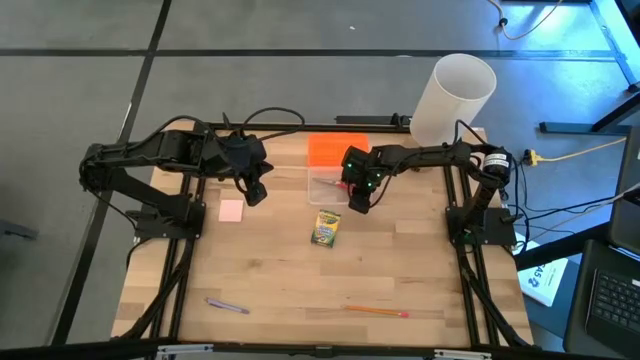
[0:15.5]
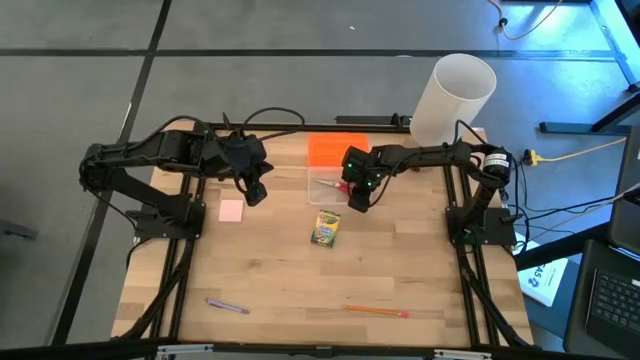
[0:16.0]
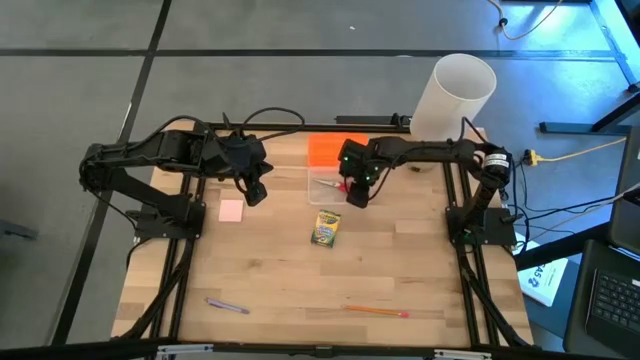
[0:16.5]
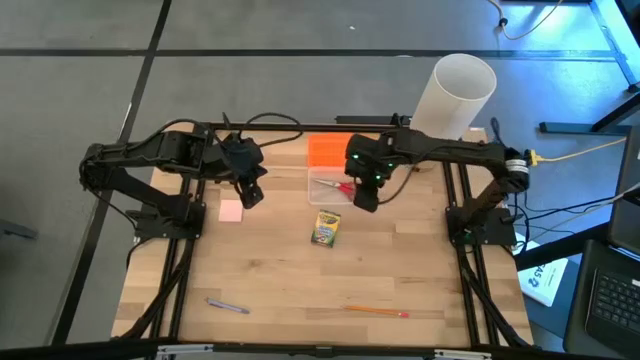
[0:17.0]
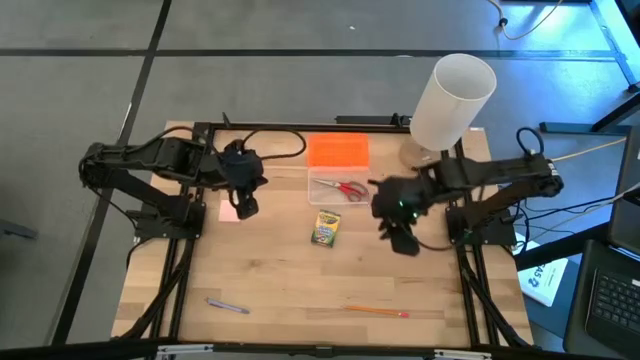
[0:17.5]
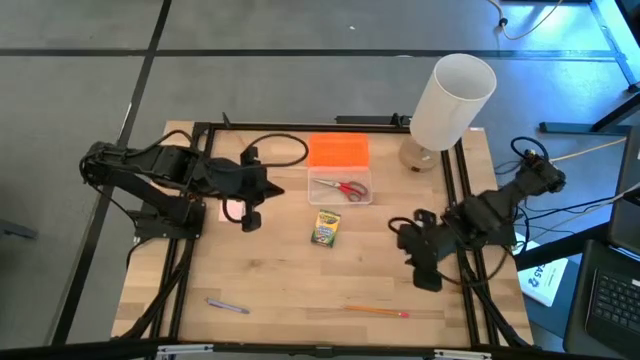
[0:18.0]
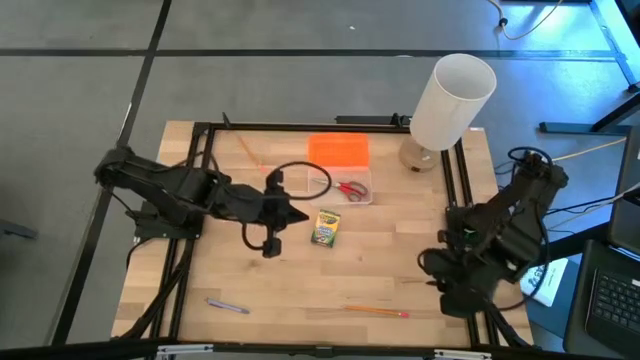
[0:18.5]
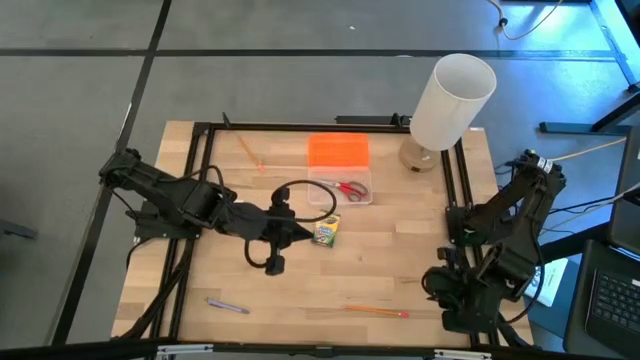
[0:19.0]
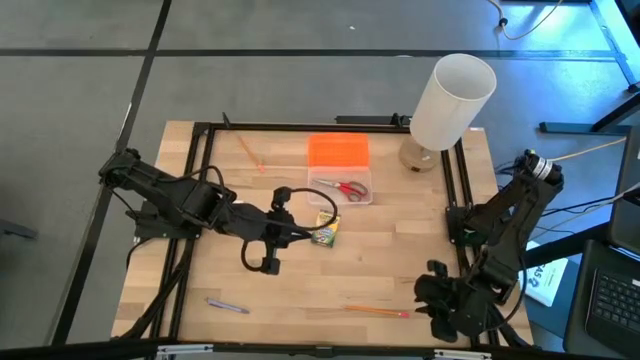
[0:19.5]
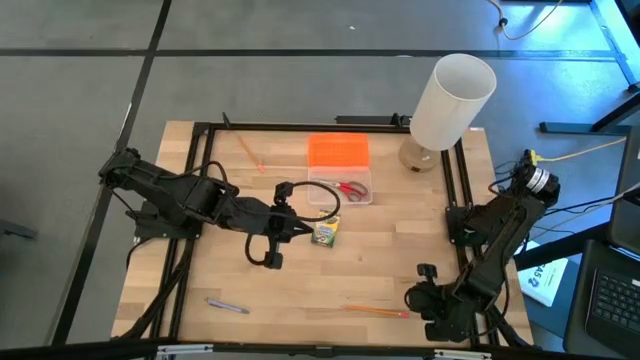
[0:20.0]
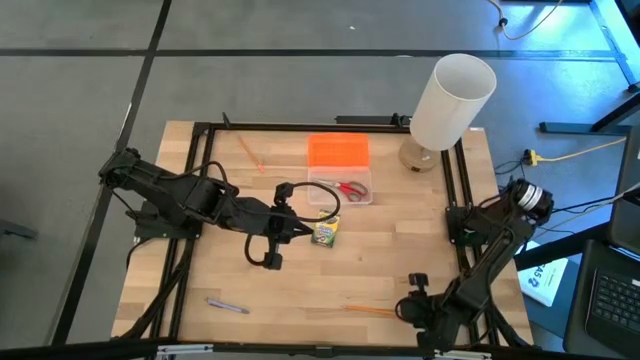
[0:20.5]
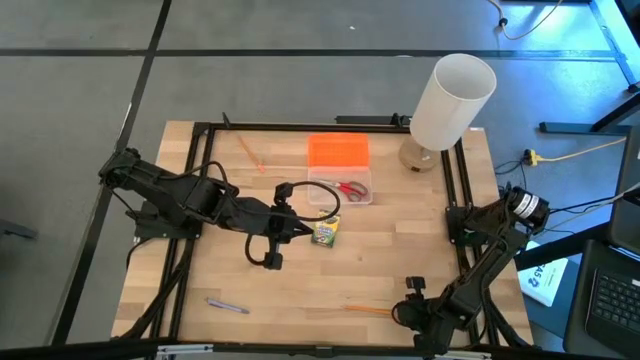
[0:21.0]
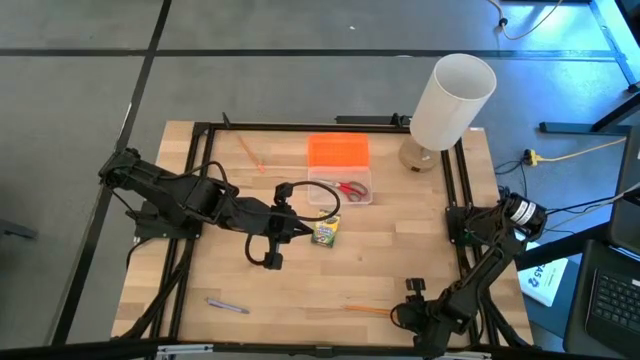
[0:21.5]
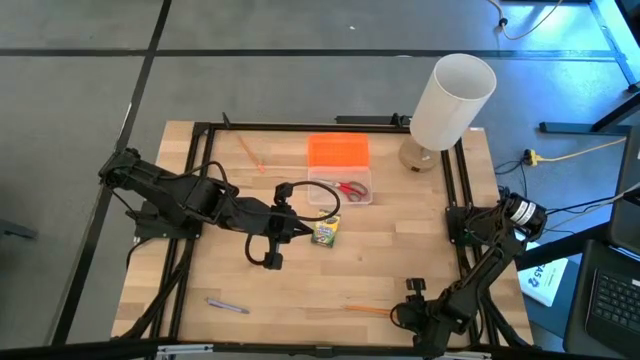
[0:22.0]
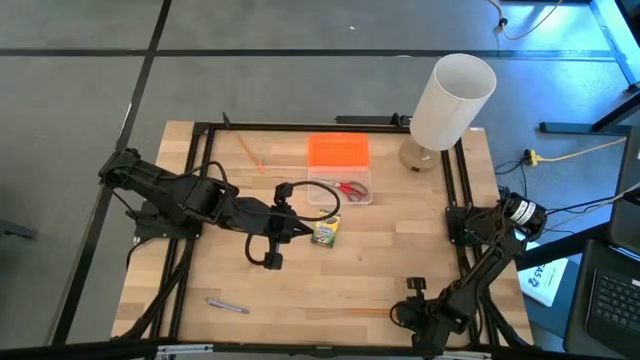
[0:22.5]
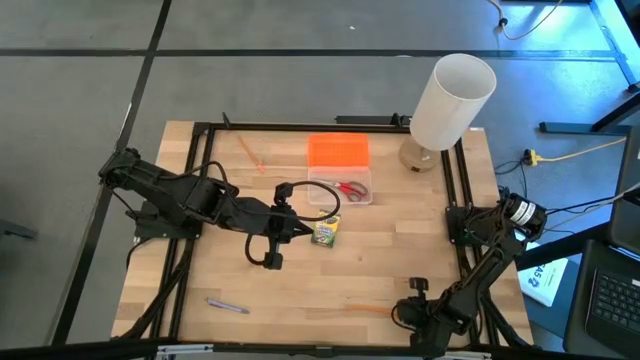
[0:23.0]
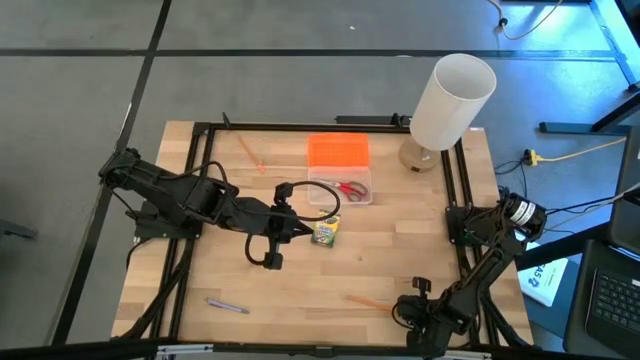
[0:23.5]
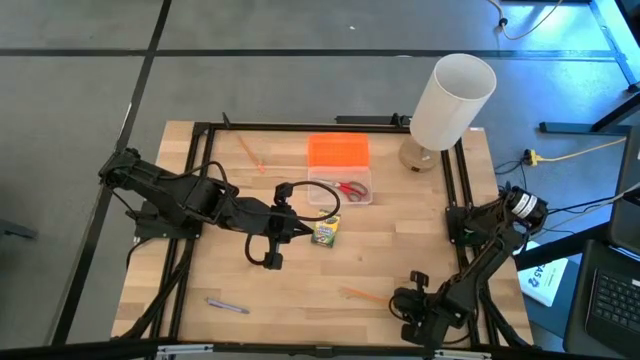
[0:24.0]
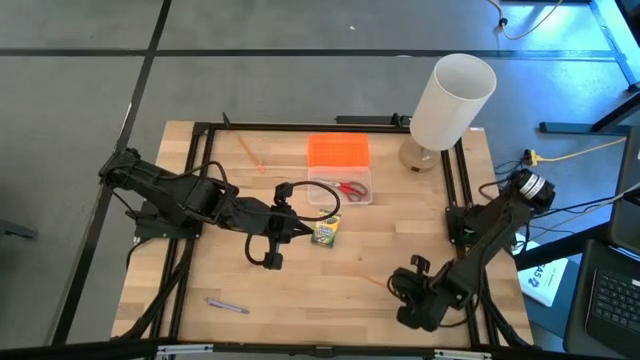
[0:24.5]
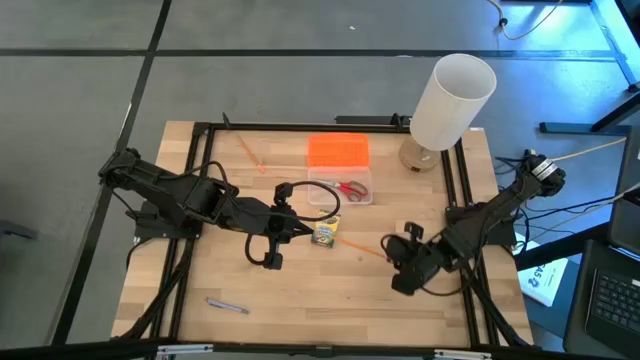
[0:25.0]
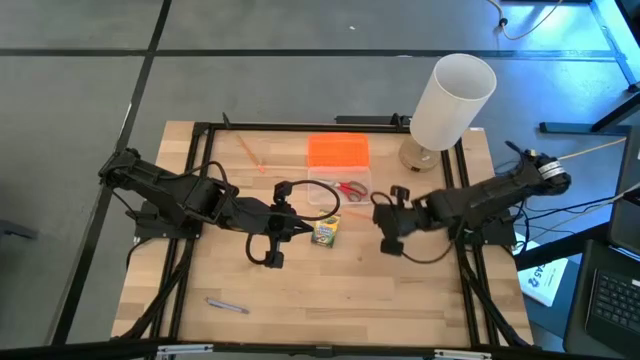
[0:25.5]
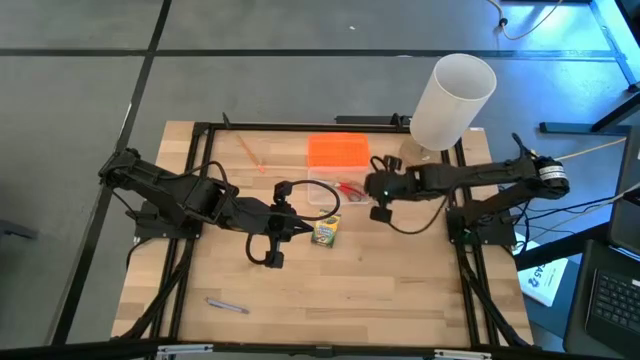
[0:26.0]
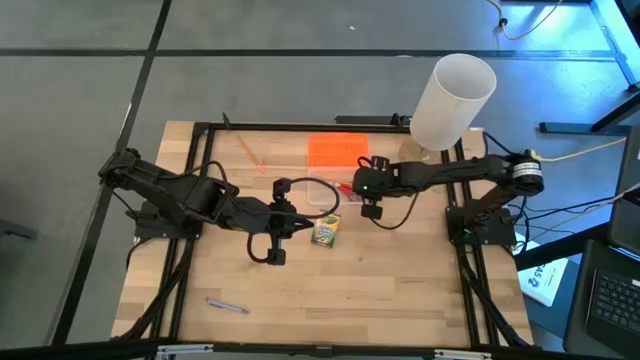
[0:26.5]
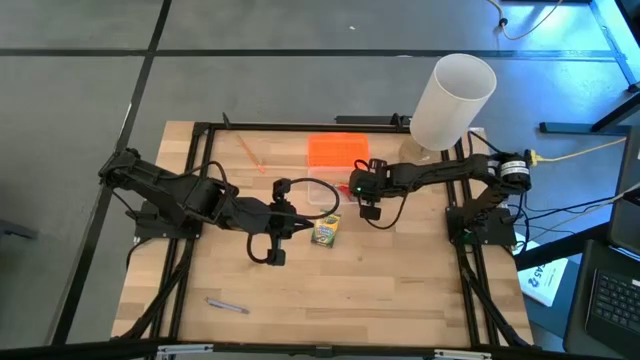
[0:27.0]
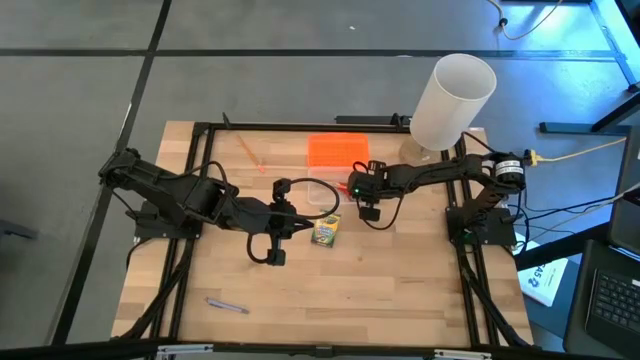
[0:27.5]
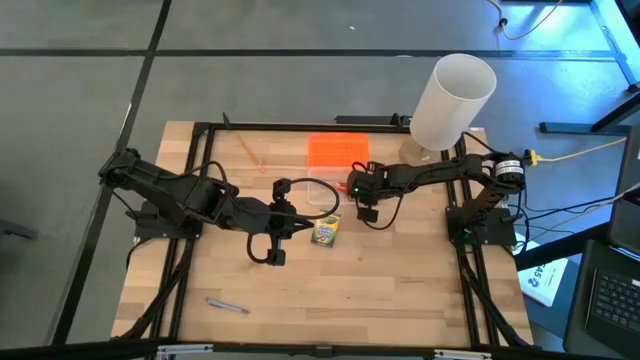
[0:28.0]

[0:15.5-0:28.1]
Task: Pack school essentials
Put the bottom orange pencil into the orange supply box

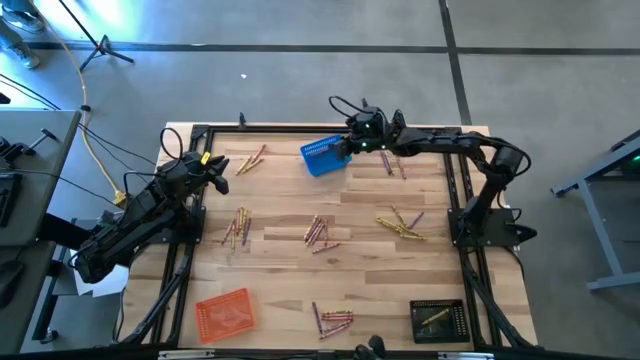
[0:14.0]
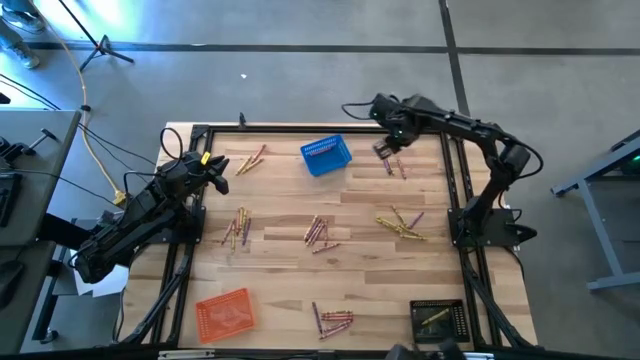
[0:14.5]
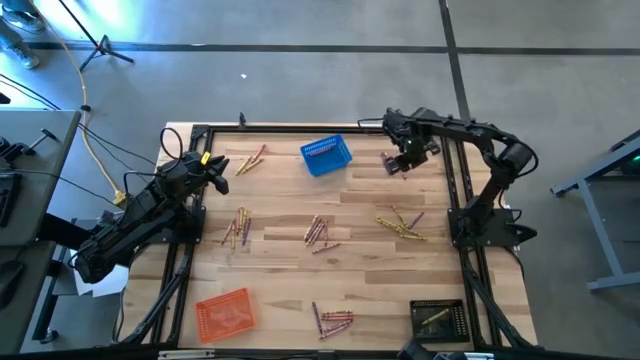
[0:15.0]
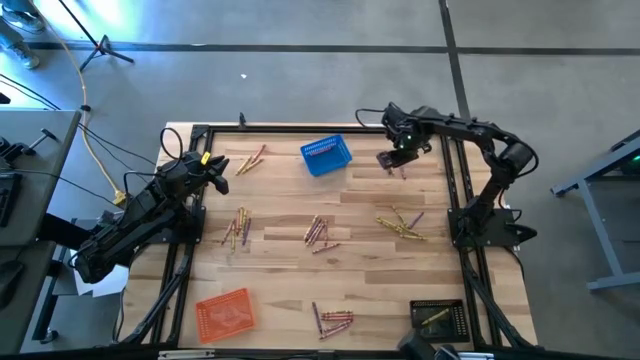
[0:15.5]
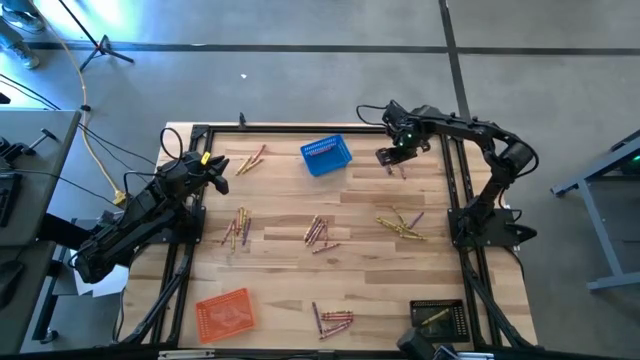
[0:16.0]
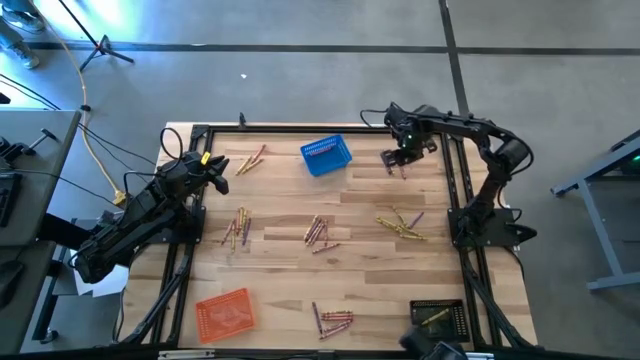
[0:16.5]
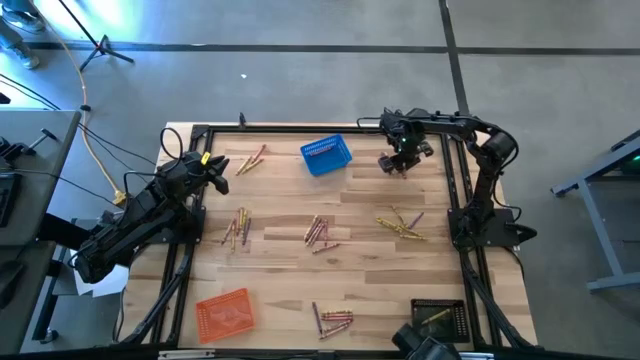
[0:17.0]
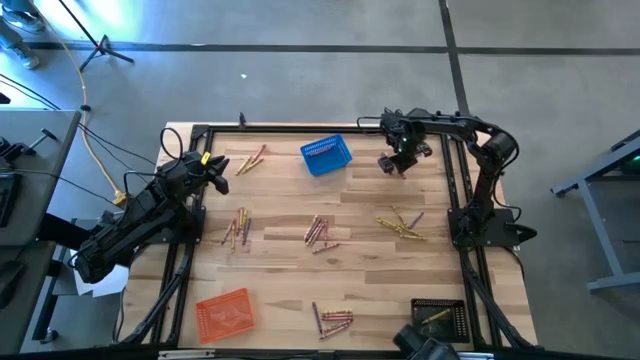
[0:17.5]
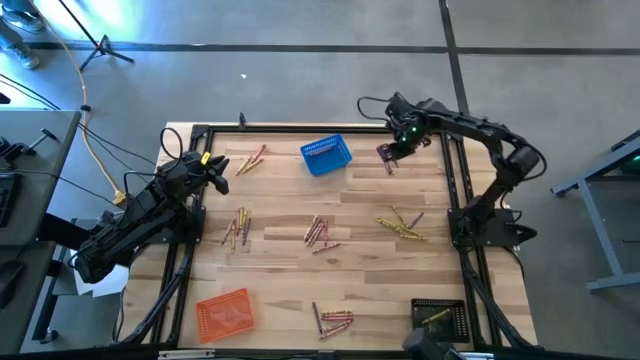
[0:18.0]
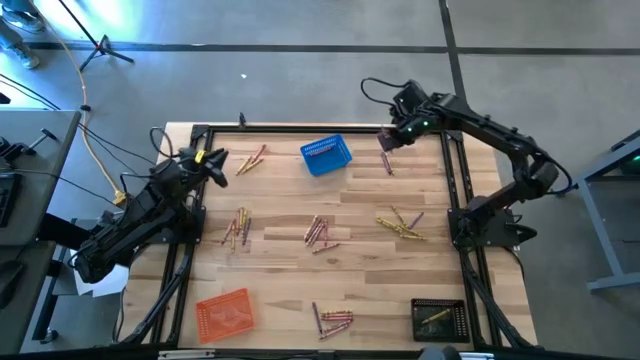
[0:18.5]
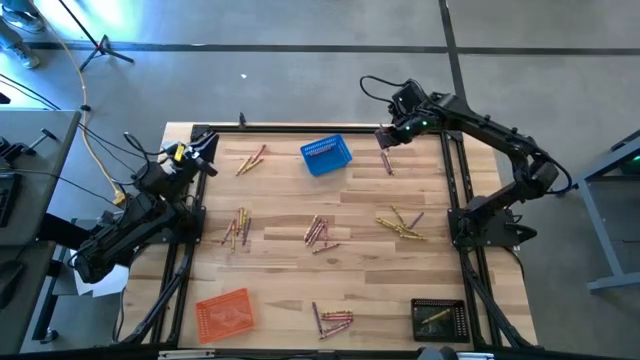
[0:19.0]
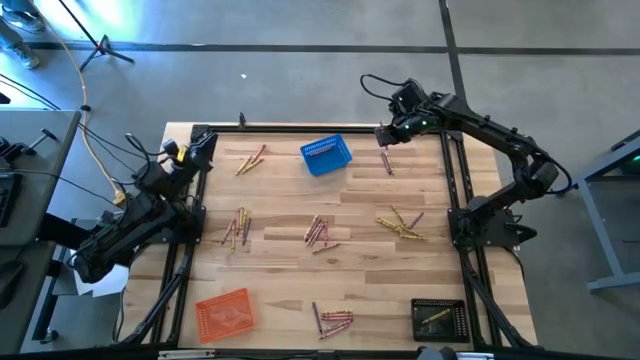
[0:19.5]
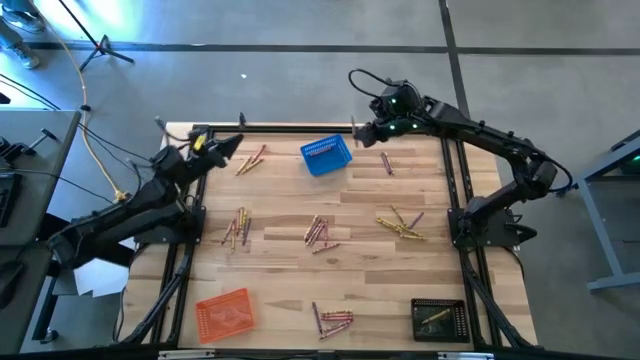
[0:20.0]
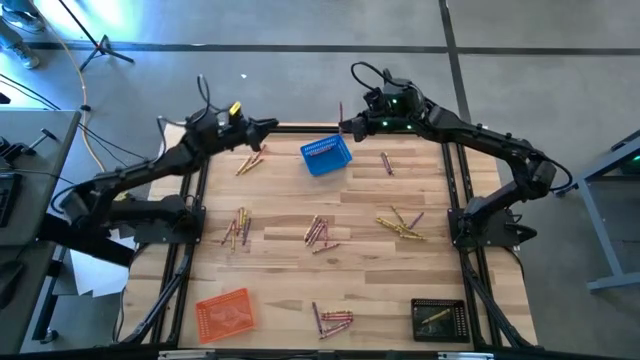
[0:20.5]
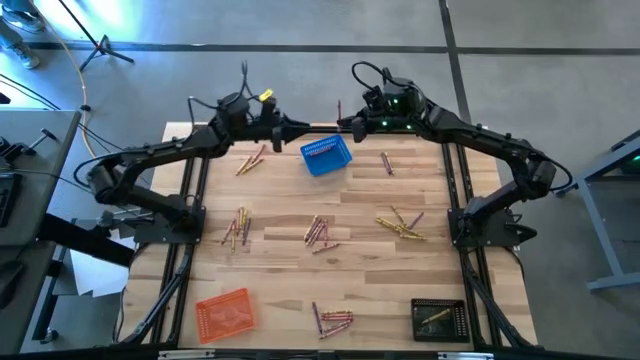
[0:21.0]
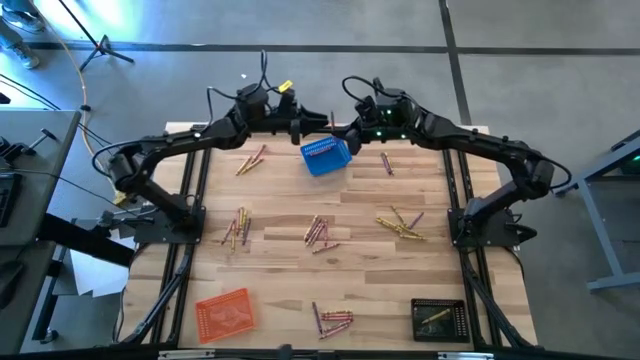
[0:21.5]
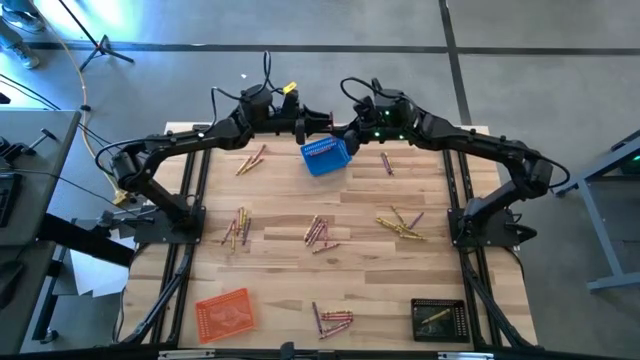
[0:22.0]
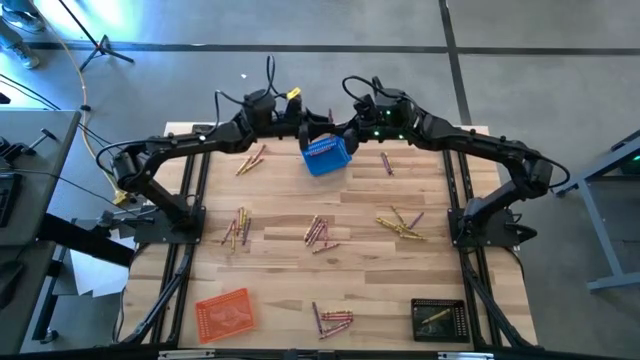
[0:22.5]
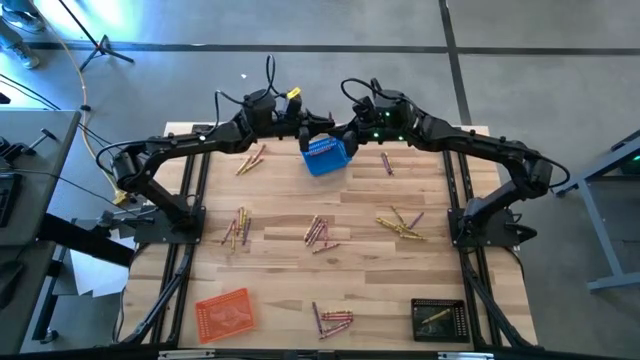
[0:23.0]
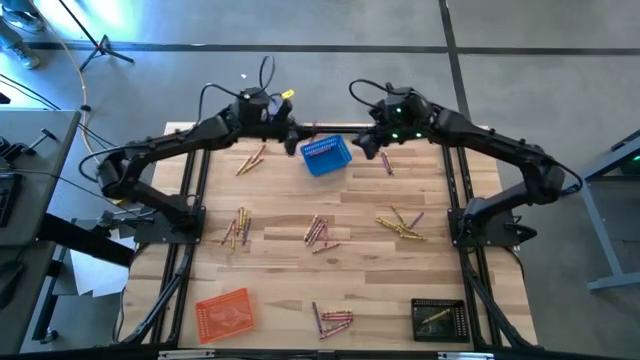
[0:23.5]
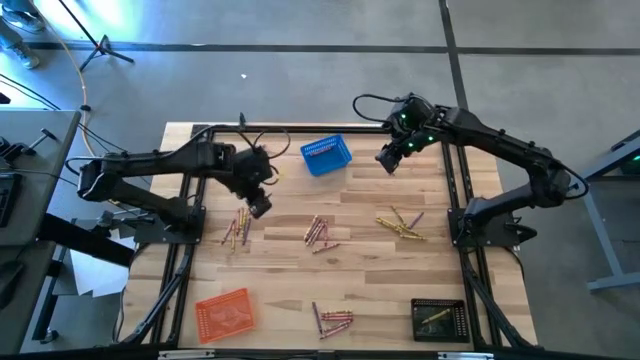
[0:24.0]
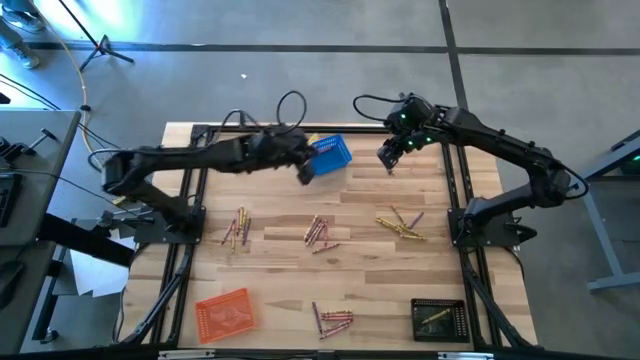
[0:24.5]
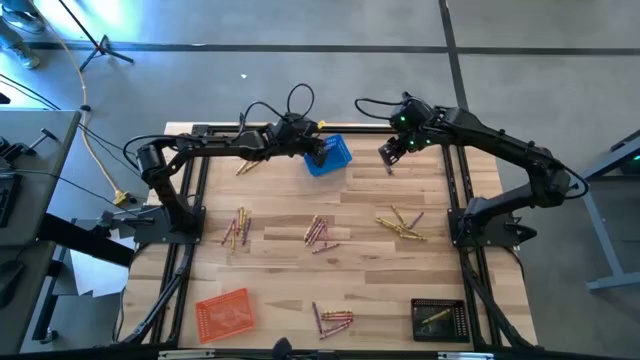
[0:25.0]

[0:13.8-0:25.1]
Task: Sort crayons
Put the red crayon into the blue bin
